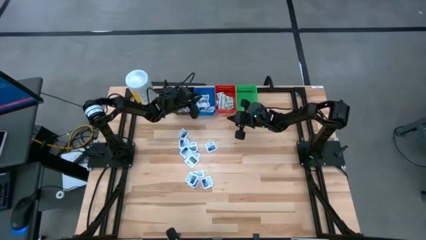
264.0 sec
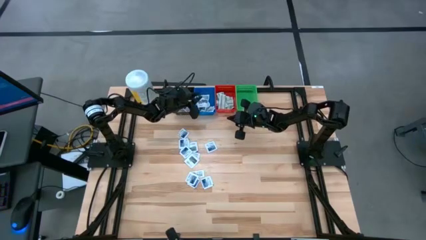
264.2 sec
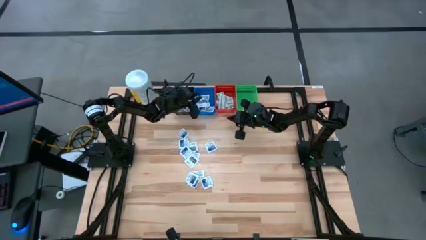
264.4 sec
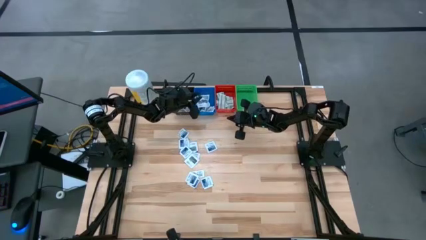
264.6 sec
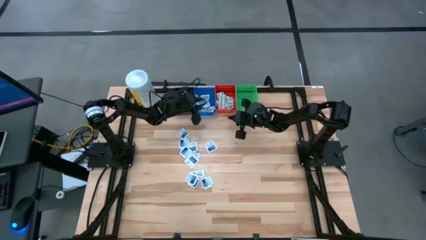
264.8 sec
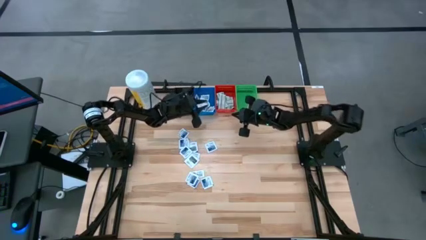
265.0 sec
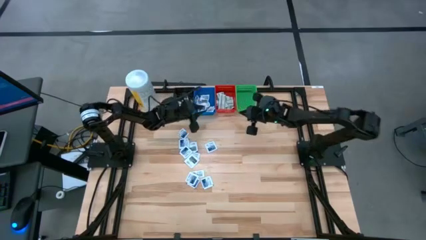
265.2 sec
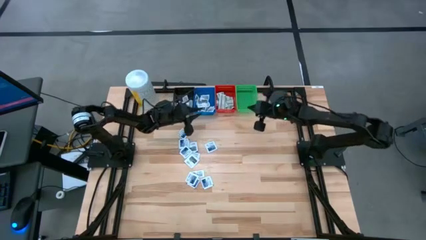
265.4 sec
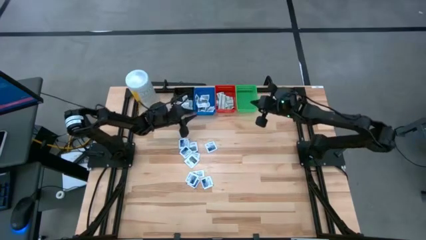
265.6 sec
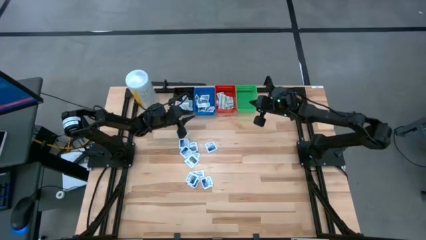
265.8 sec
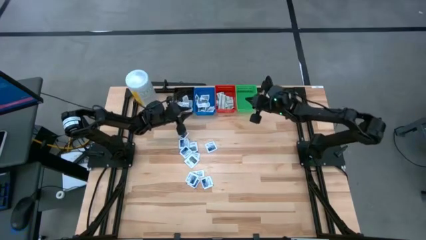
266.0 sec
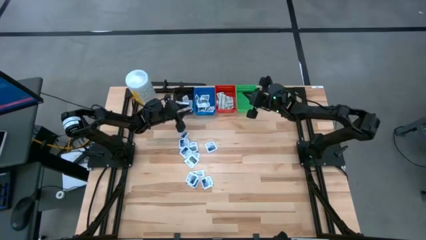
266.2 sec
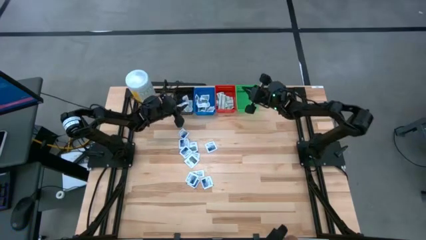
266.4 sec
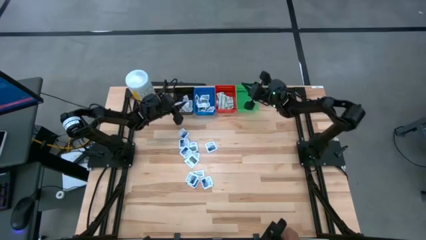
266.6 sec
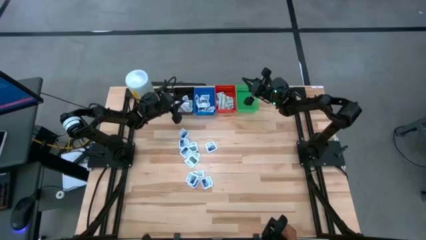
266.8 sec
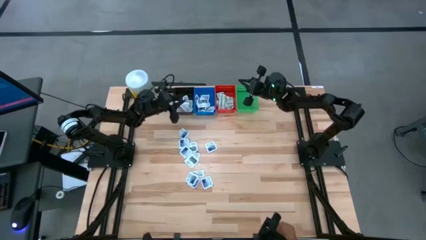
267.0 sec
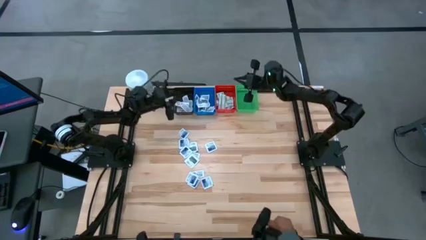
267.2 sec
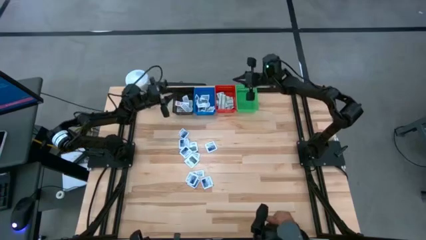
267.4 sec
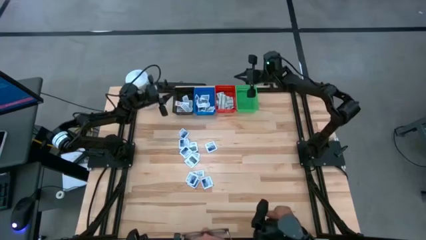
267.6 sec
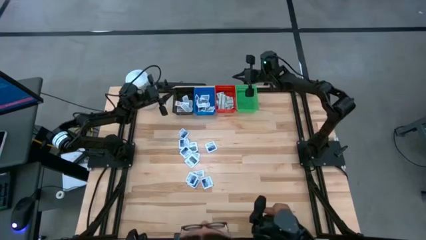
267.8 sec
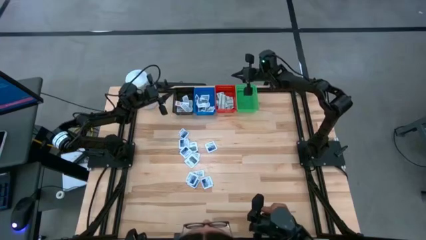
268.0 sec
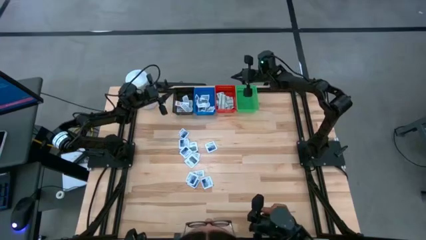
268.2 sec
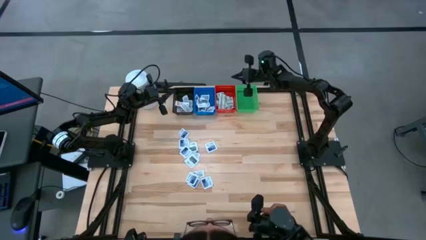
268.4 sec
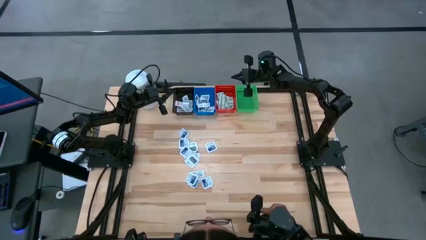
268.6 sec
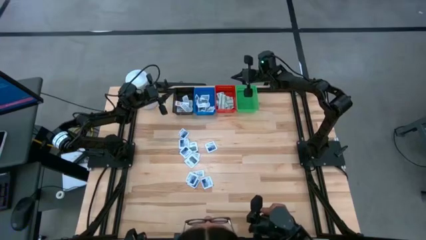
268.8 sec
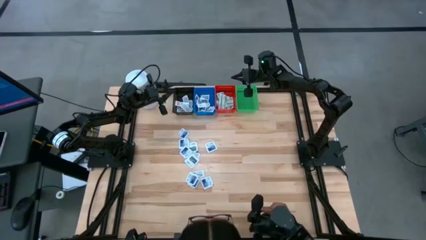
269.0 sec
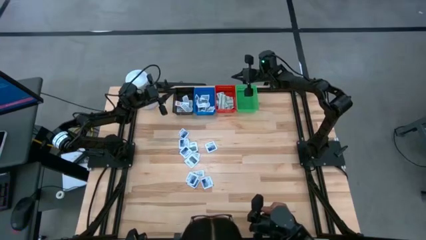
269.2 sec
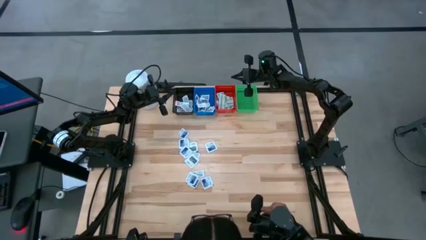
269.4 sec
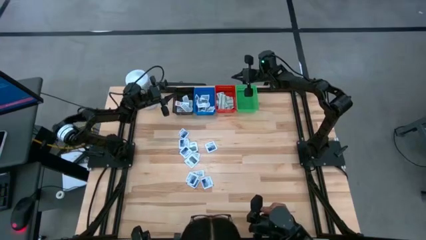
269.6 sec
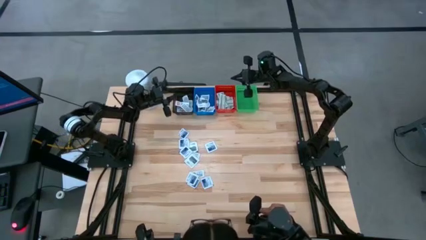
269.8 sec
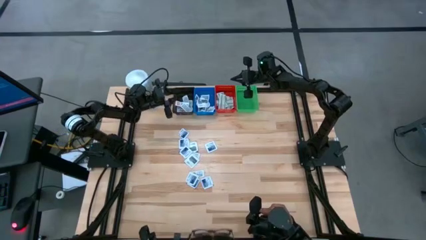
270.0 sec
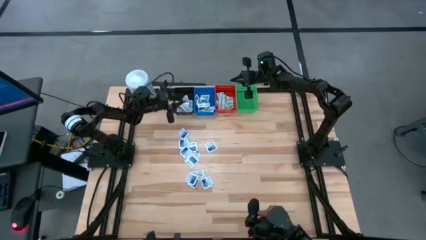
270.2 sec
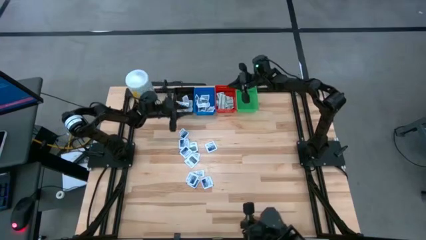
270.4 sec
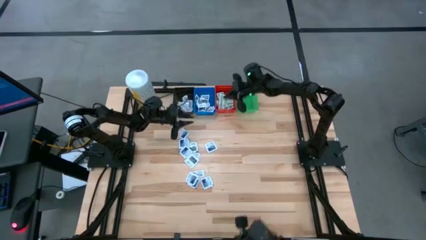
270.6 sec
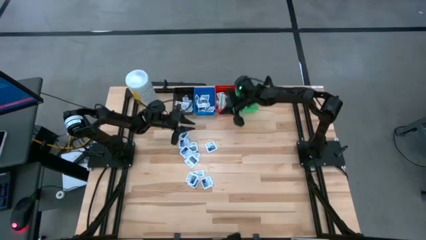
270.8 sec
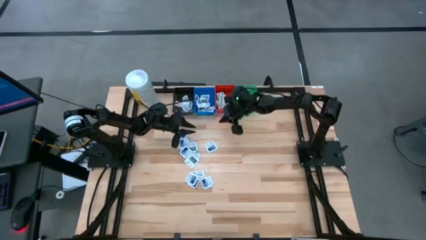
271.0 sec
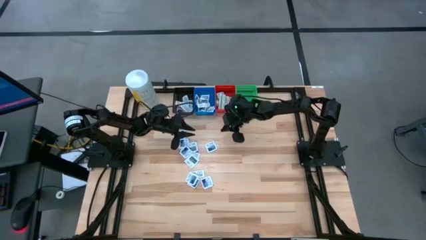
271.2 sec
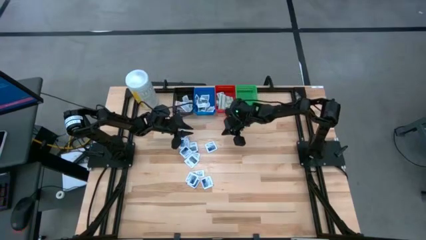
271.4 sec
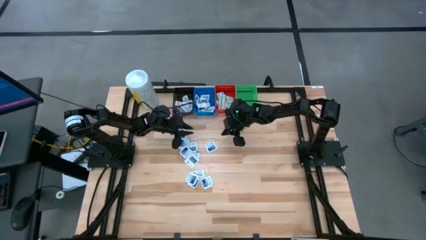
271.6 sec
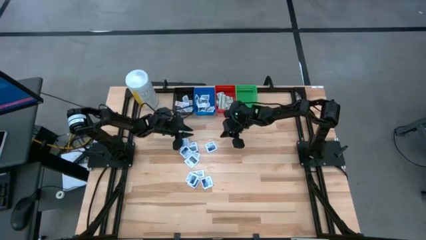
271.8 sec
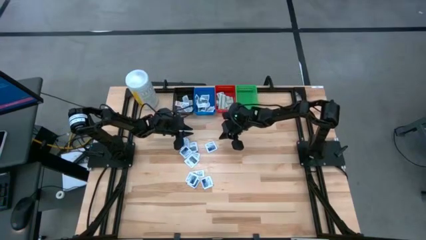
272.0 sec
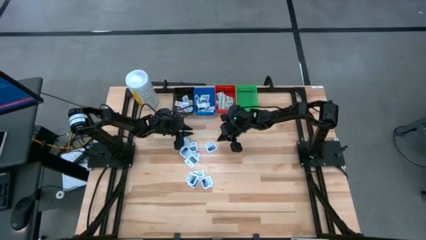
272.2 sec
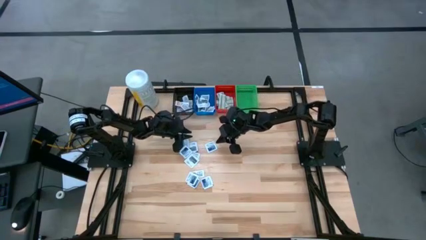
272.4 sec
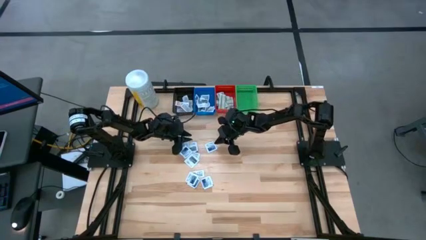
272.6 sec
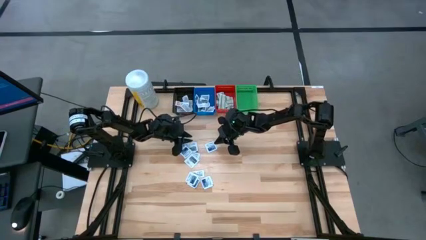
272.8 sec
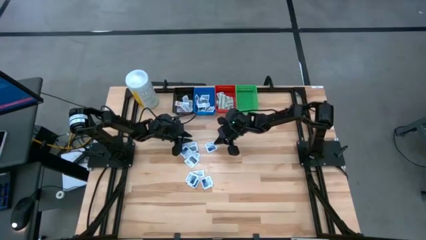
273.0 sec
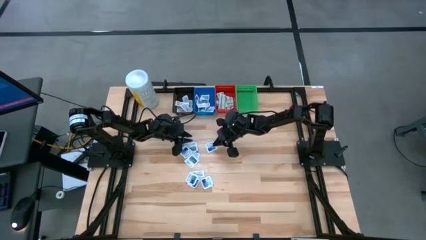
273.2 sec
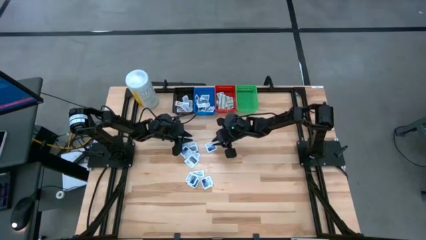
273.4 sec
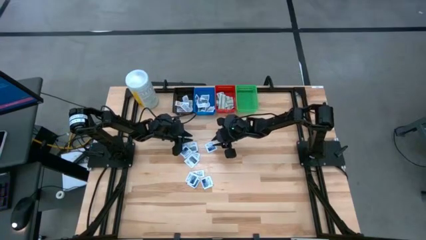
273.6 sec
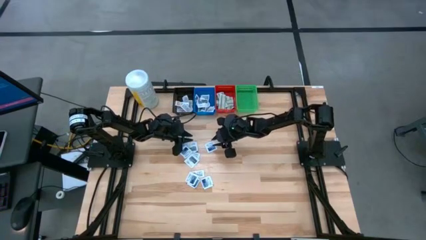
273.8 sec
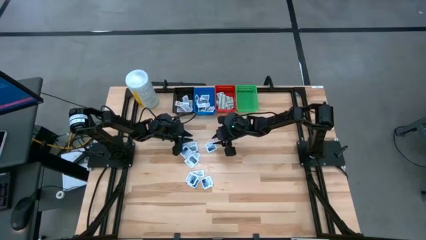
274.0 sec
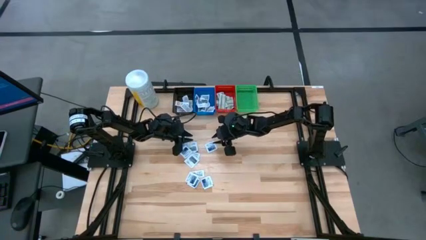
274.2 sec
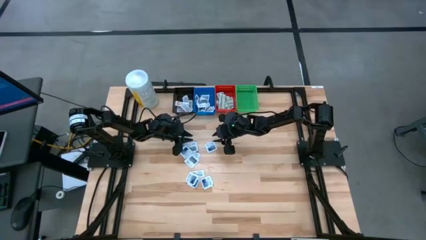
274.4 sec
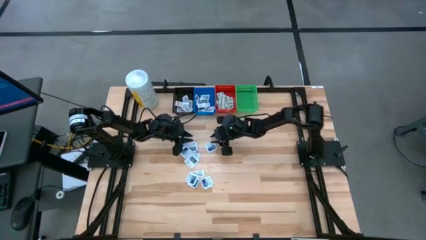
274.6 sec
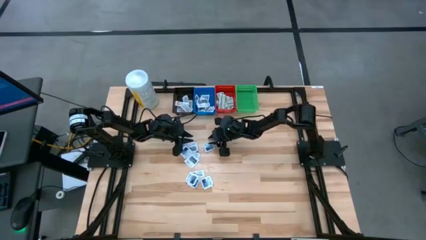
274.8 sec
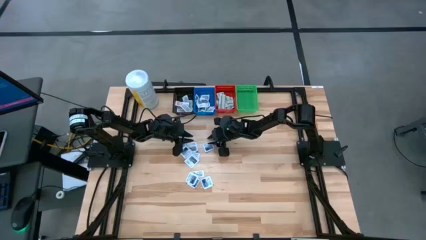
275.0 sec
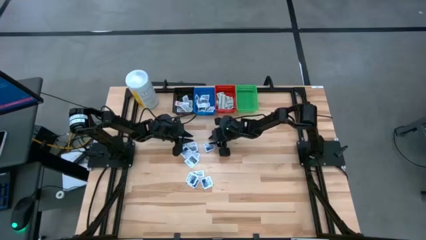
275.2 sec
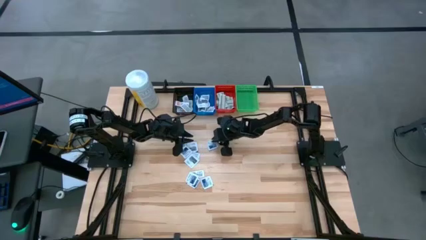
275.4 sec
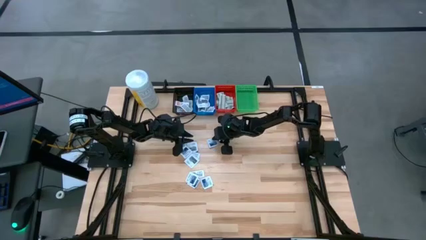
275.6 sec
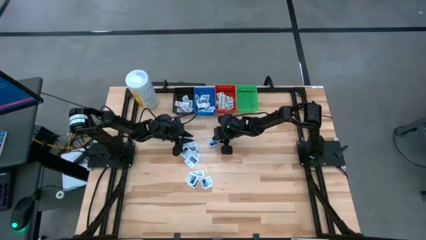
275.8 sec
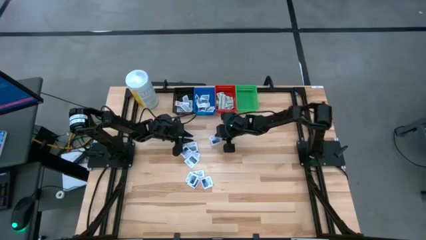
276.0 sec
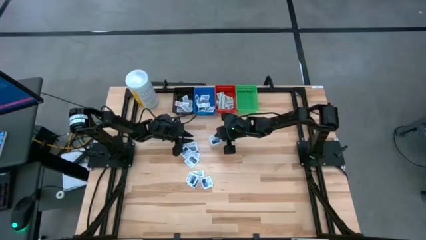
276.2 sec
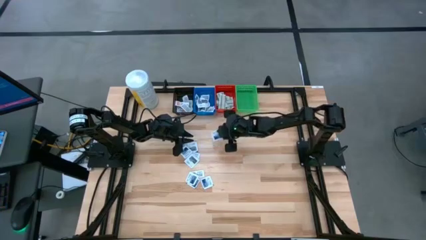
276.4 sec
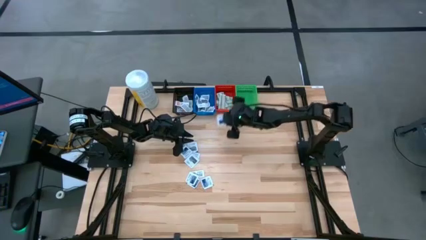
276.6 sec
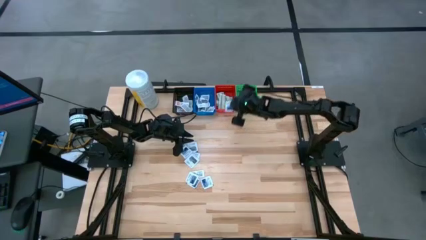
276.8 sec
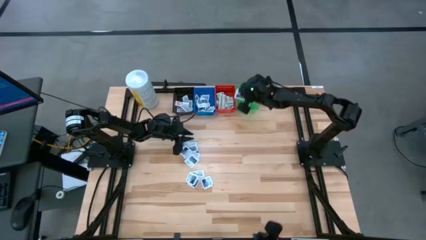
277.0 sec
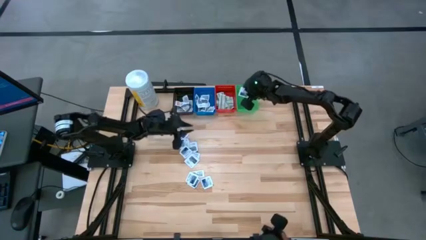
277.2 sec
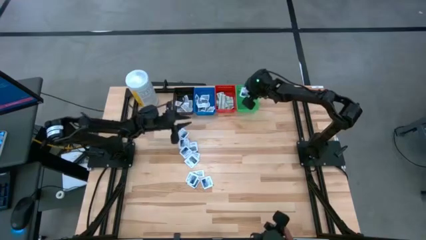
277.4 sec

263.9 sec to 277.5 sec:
Task: Pick & Place First Aid Supplies
Put the blue alcohol pad into the green bin
